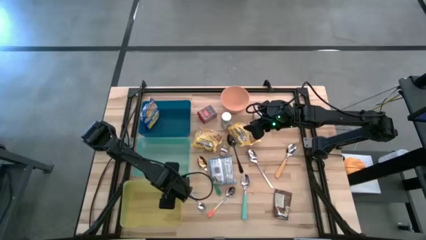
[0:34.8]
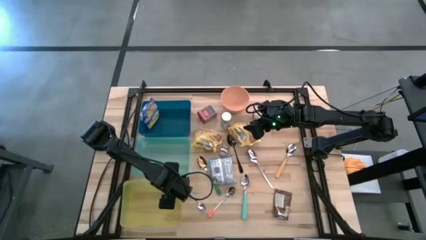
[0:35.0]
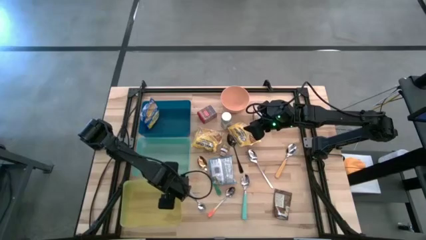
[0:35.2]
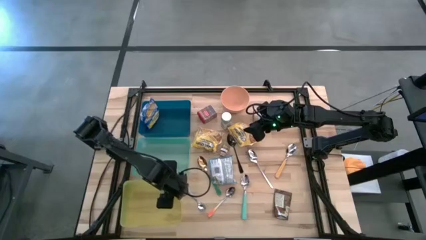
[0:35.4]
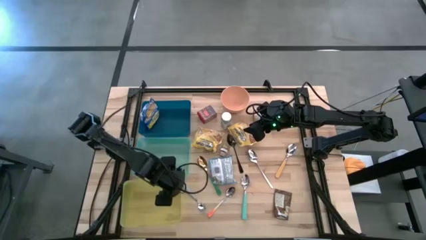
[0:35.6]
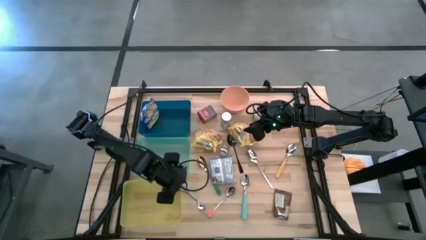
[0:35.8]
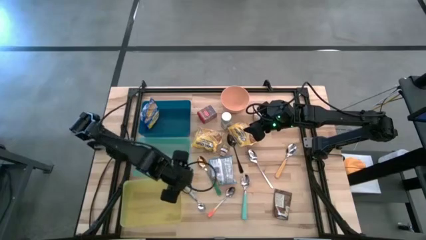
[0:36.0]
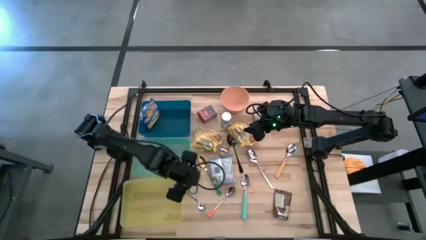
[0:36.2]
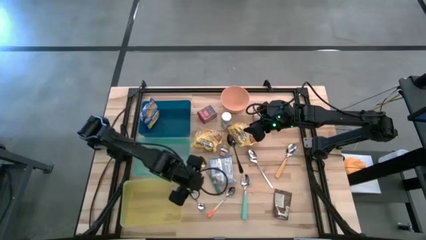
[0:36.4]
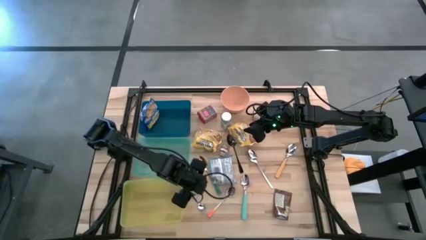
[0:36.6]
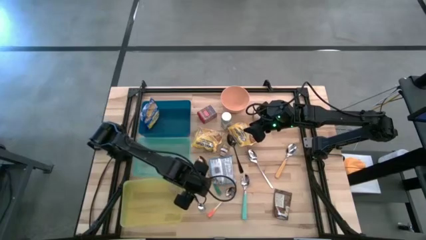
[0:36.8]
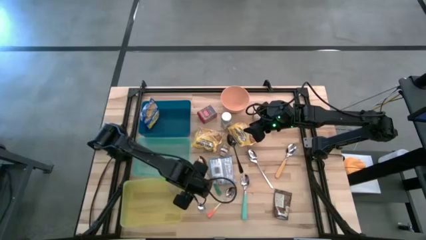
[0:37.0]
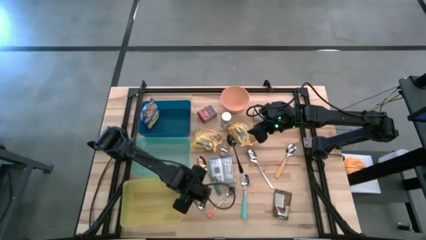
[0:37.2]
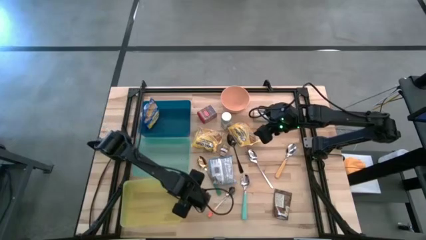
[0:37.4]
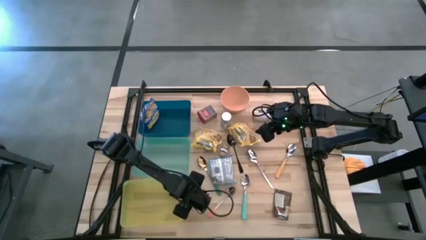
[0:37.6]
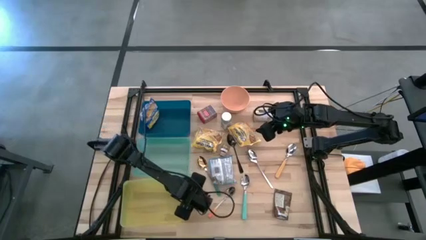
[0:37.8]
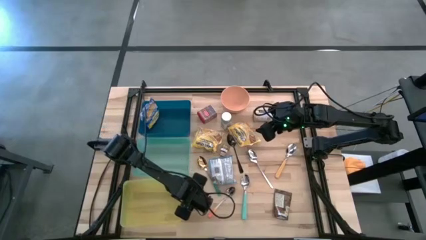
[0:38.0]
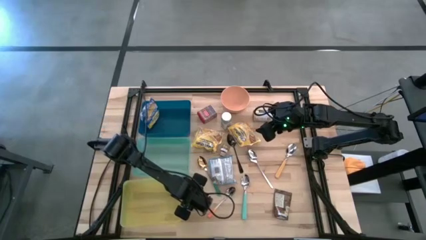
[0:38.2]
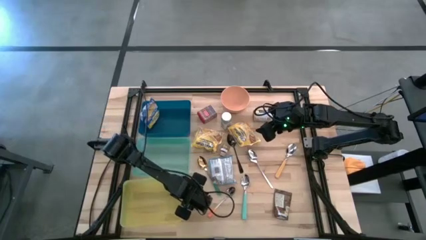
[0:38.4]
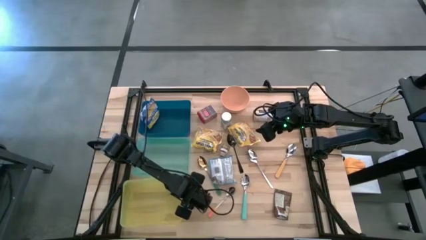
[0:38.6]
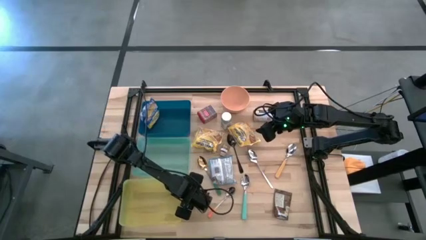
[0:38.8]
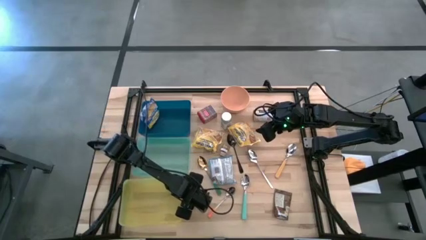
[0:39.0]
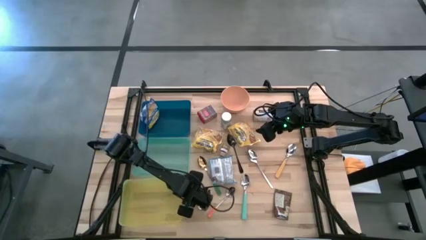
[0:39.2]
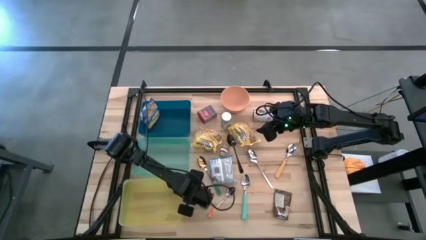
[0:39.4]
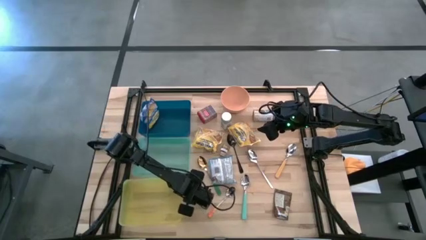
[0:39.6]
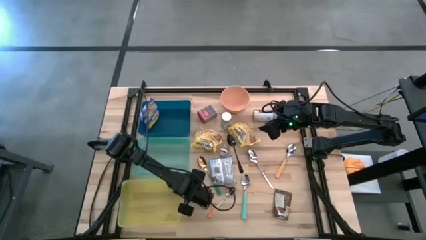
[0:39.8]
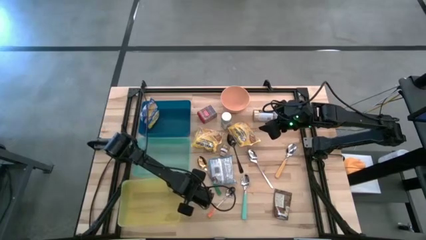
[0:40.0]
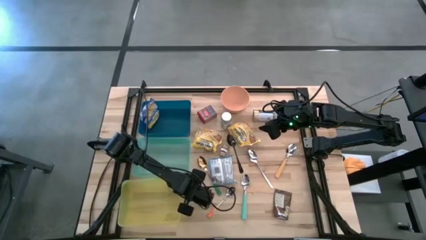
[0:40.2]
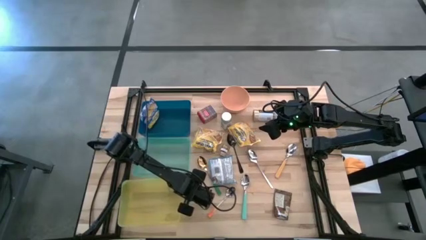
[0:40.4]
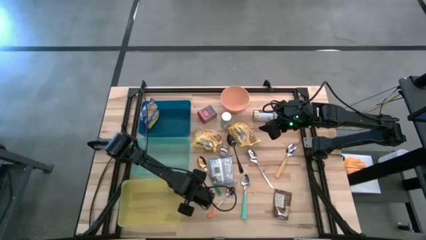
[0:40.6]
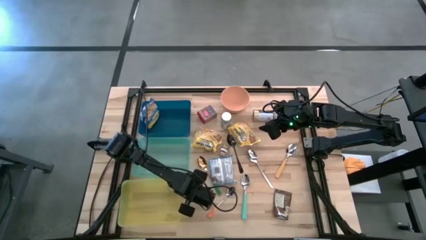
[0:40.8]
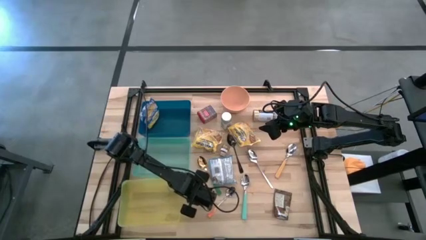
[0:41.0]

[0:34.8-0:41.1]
Put the blue spoon into the light blue bin

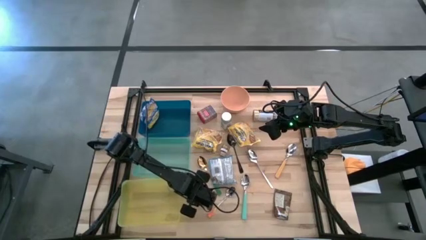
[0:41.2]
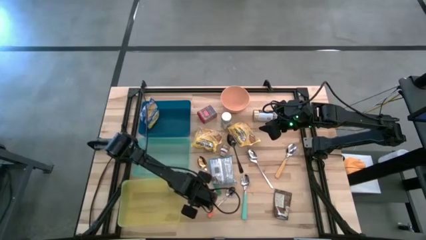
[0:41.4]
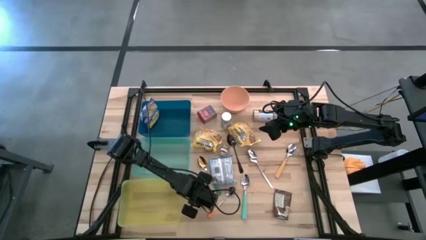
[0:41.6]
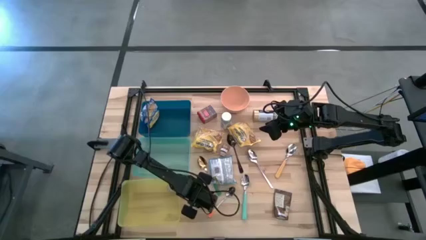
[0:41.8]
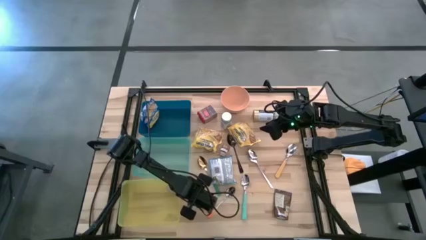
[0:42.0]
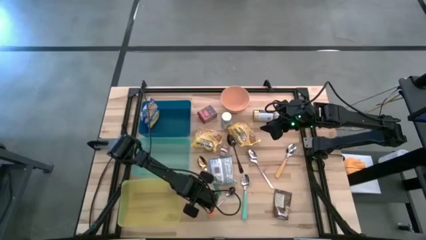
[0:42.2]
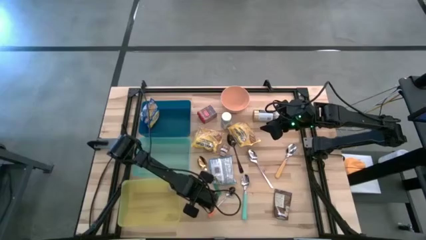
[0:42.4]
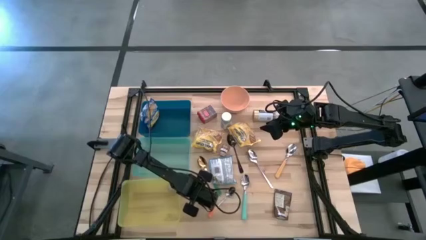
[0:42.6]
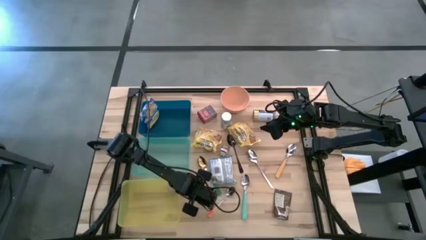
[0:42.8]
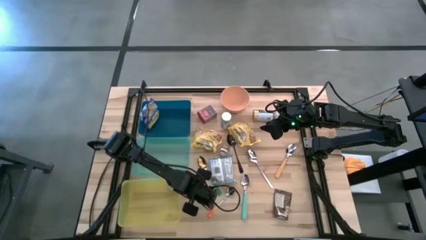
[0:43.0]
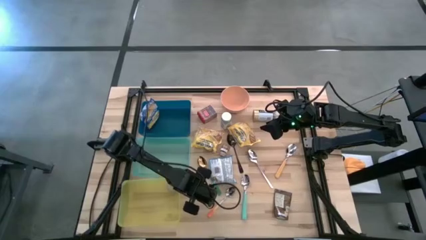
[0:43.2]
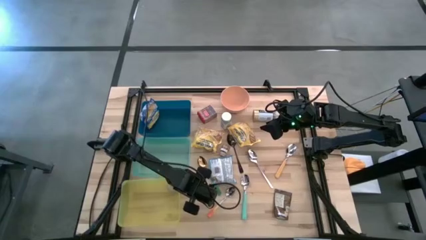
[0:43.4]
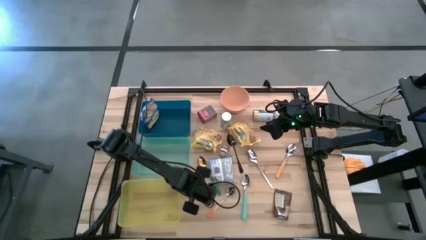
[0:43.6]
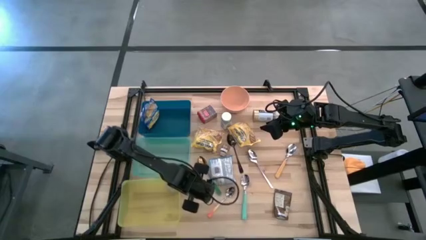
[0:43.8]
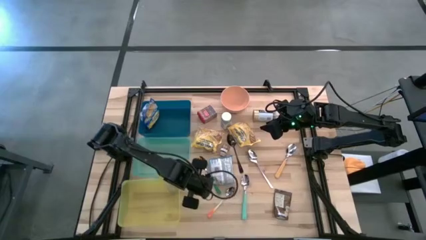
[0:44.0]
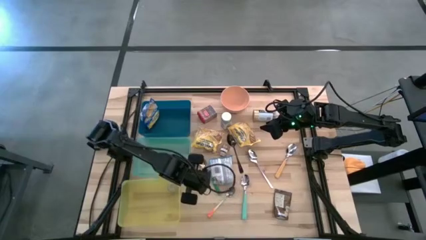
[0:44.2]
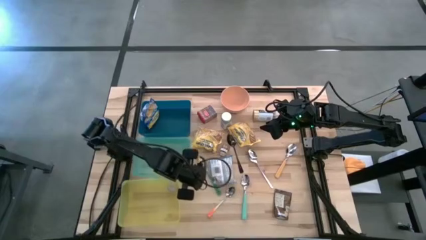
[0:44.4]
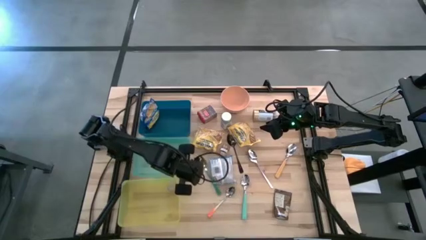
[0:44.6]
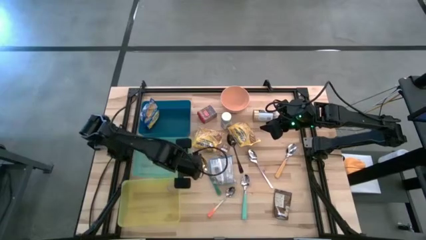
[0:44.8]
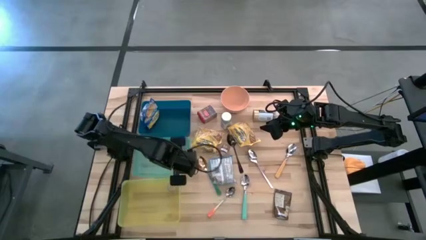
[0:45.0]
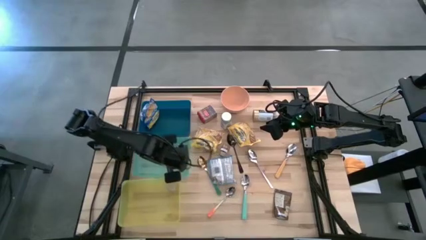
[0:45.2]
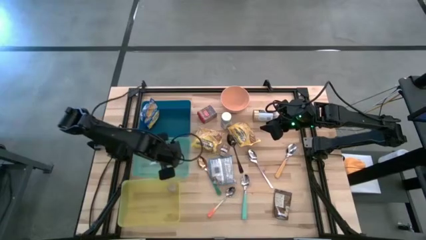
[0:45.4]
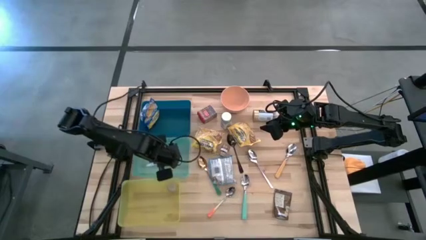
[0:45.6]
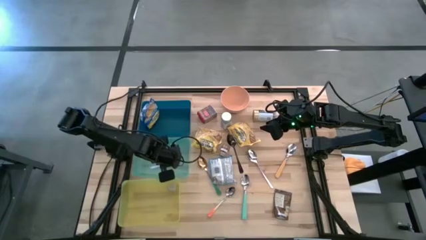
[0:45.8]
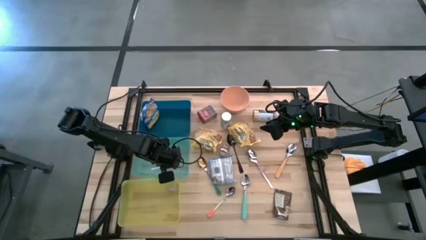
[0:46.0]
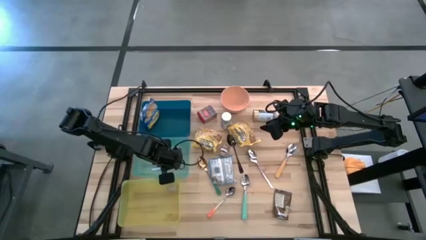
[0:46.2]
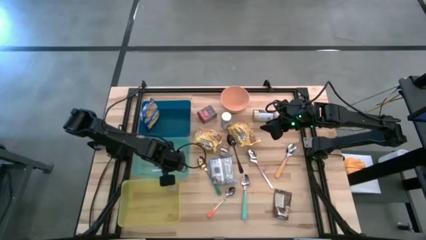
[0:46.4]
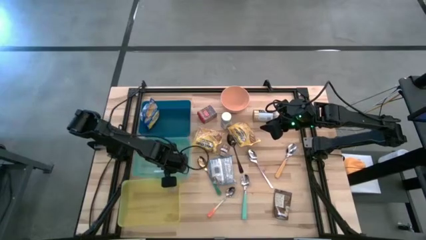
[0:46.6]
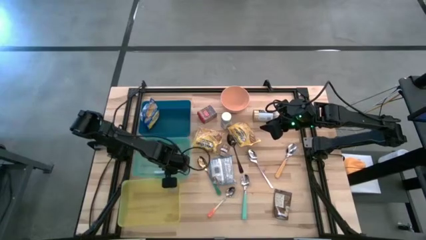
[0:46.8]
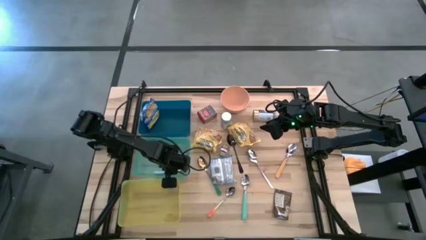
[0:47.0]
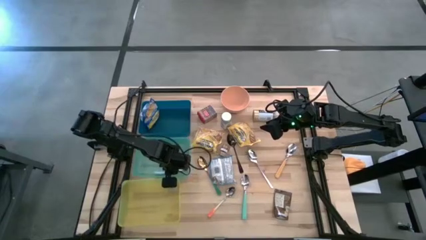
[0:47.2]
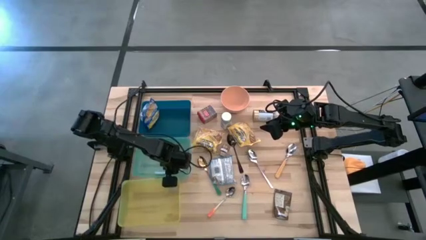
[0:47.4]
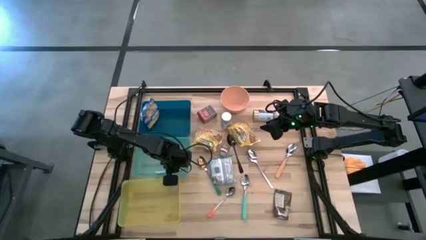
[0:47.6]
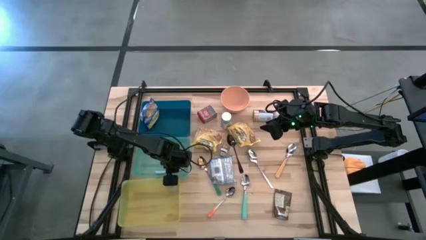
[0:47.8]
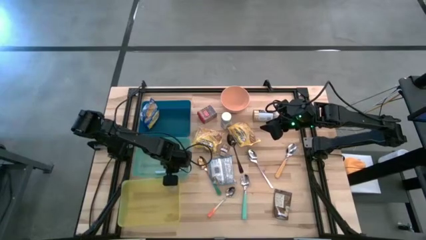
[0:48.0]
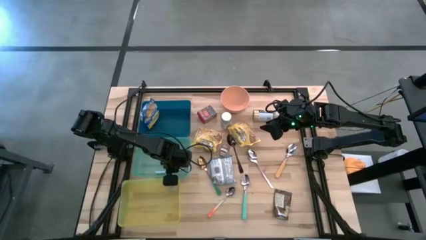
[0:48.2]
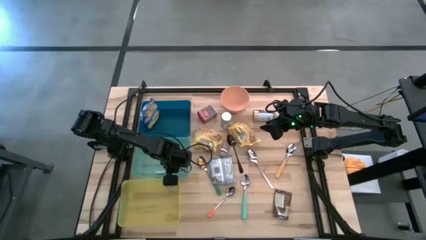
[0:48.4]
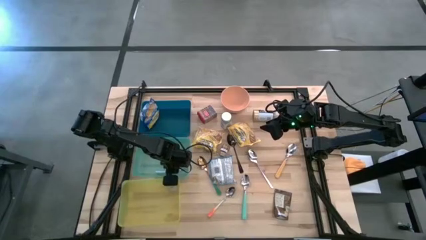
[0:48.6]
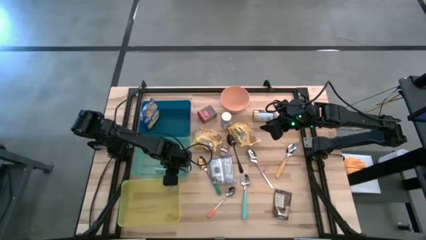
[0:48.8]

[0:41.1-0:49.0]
Put the blue spoon into the light blue bin
